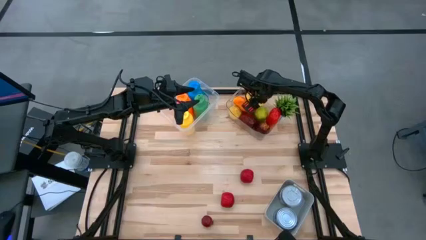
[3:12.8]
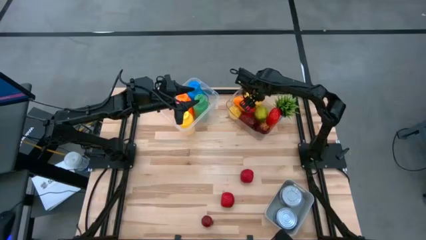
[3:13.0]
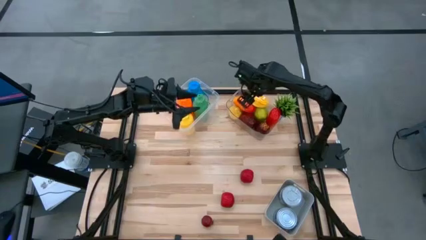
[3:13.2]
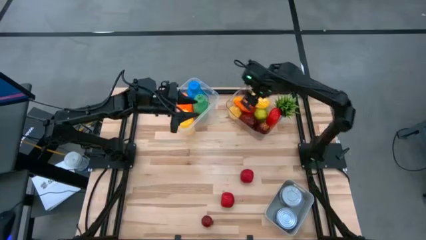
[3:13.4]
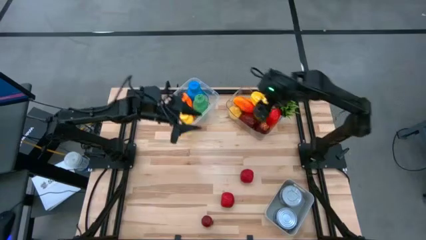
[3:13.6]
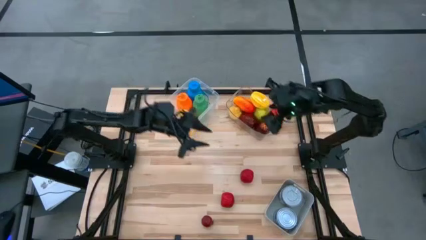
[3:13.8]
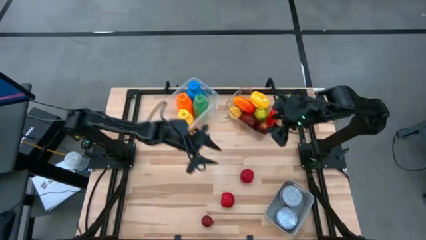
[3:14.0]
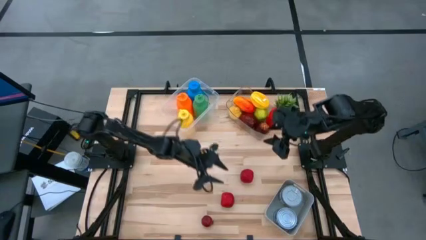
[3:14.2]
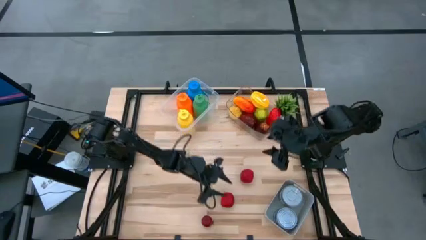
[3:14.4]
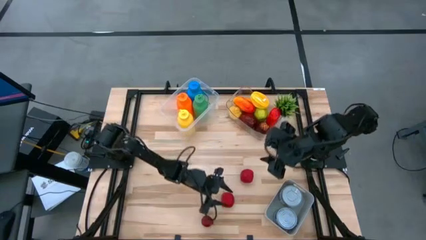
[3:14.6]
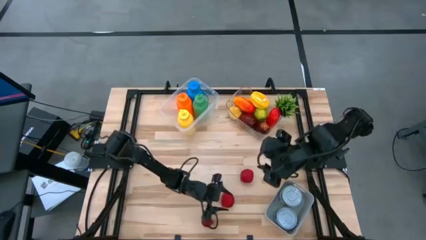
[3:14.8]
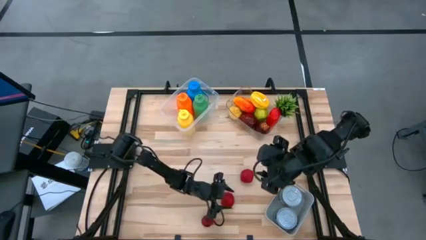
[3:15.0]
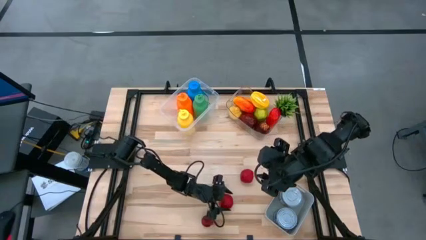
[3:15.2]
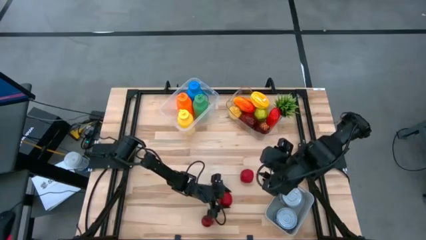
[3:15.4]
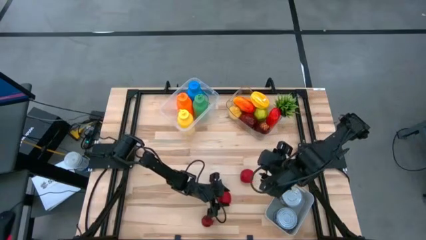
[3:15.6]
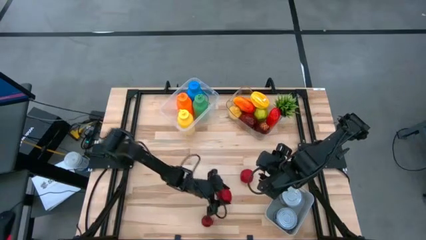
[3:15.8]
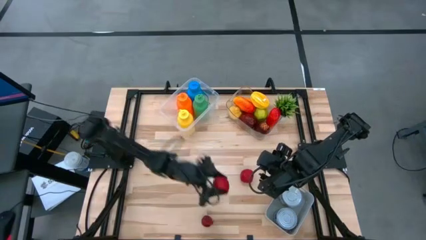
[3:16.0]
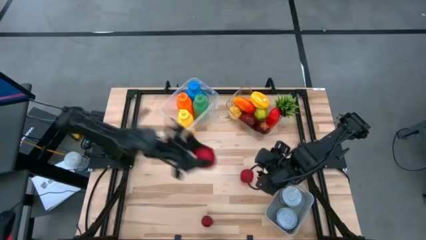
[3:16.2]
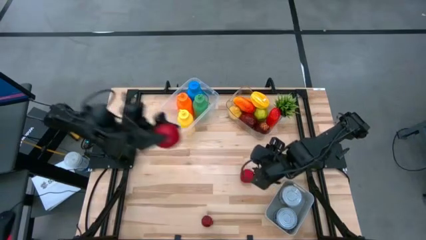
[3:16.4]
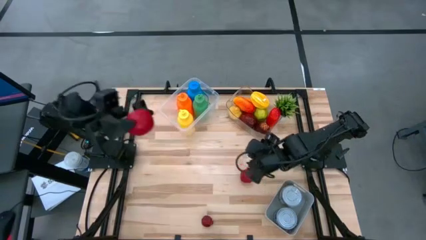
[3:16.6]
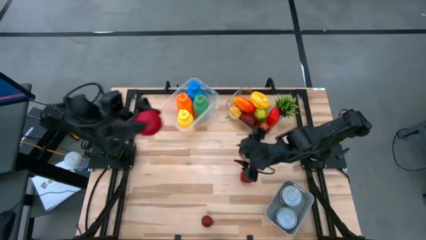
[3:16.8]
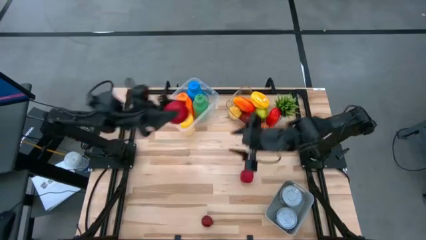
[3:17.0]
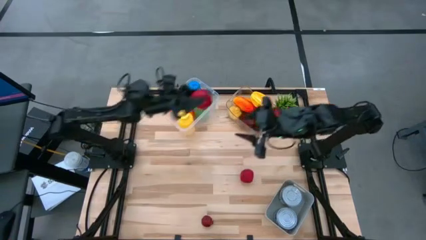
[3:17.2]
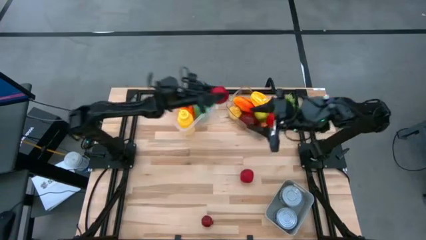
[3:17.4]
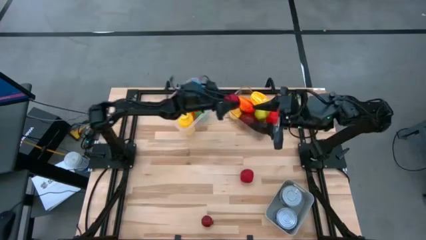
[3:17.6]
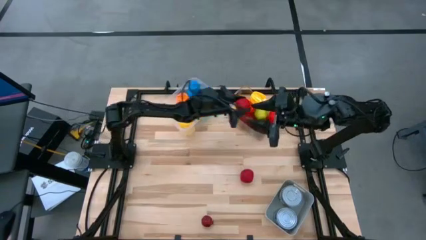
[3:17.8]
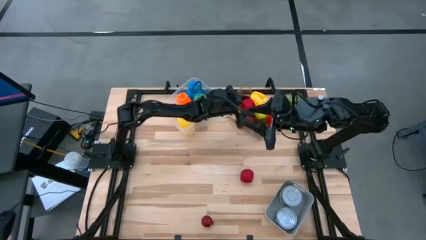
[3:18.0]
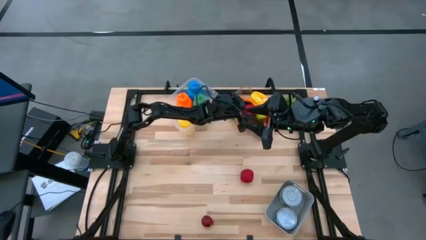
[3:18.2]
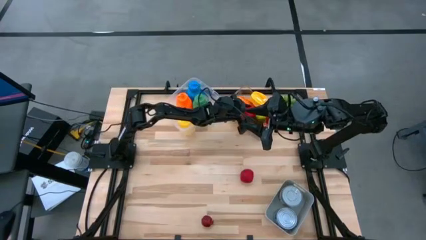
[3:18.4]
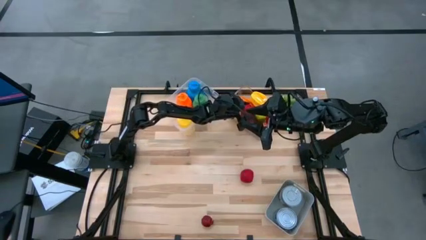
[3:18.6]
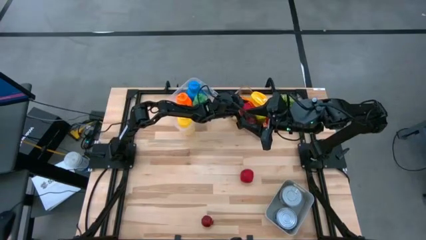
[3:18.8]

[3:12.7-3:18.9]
Task: Pick & Place Food Item
Put the bottom red apple into the right transparent bin

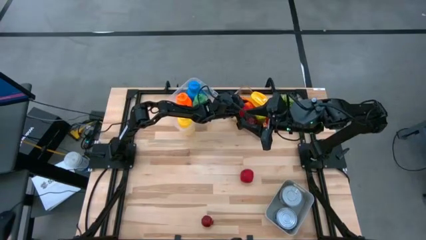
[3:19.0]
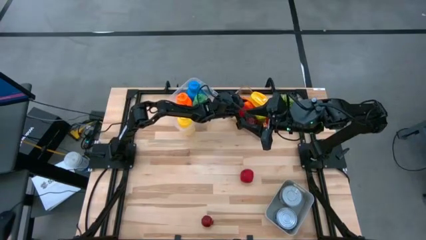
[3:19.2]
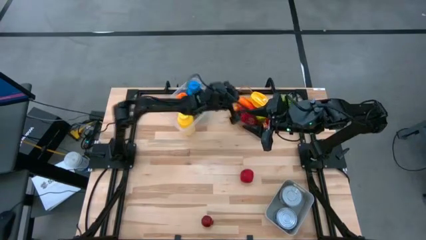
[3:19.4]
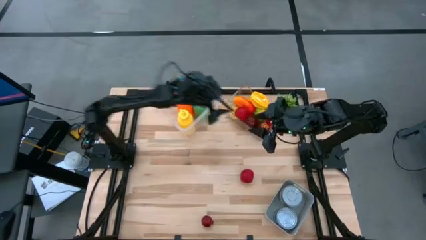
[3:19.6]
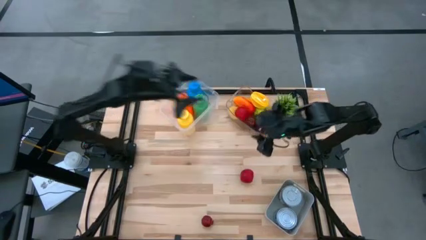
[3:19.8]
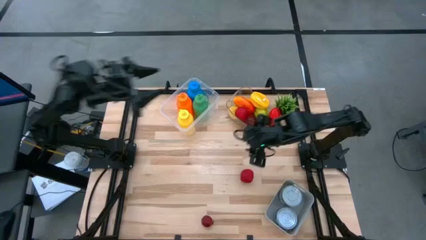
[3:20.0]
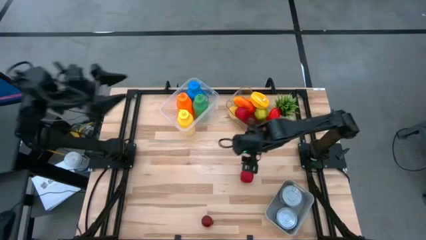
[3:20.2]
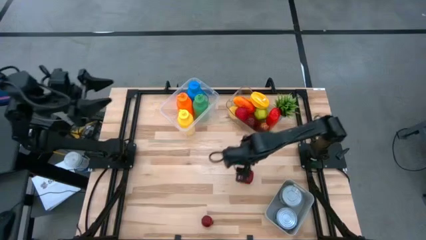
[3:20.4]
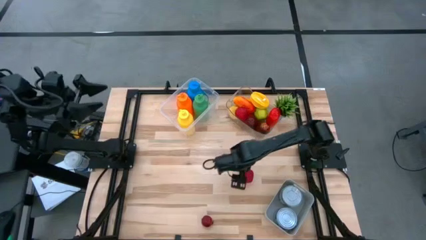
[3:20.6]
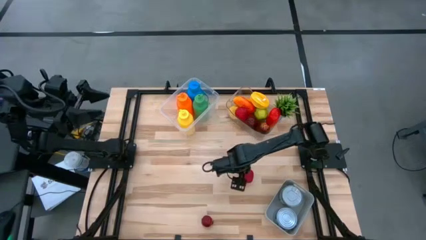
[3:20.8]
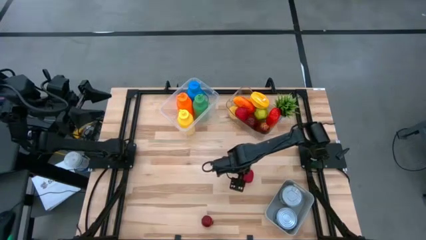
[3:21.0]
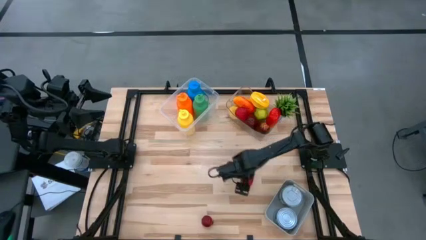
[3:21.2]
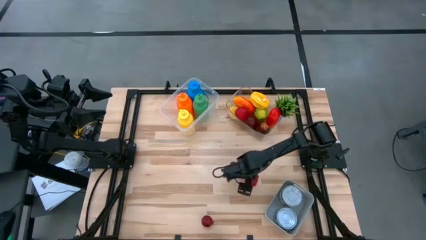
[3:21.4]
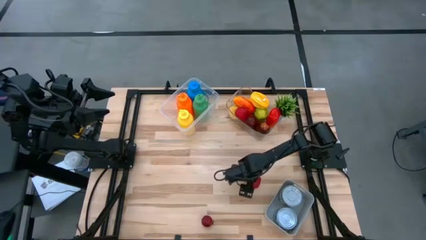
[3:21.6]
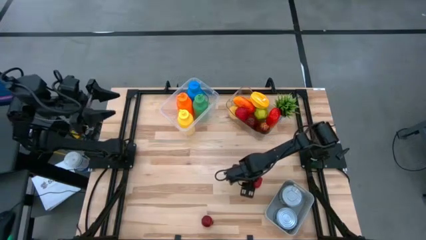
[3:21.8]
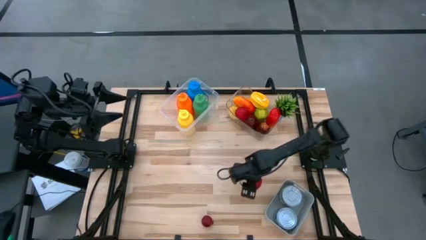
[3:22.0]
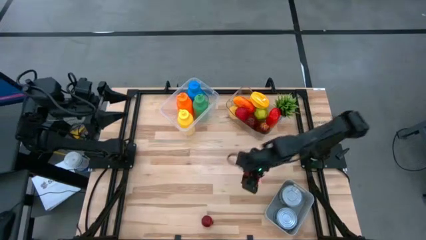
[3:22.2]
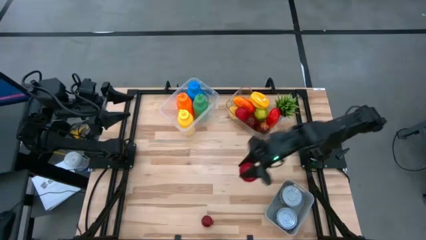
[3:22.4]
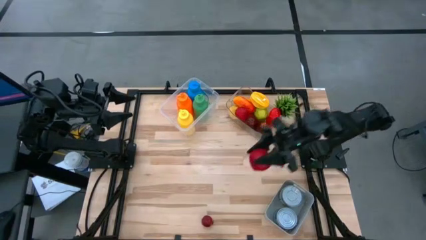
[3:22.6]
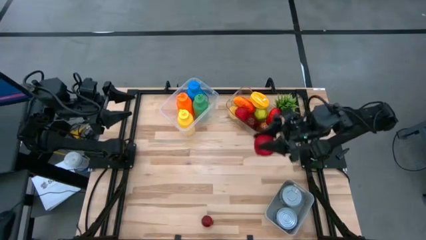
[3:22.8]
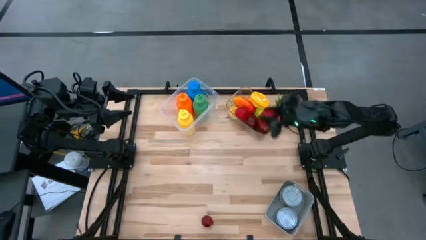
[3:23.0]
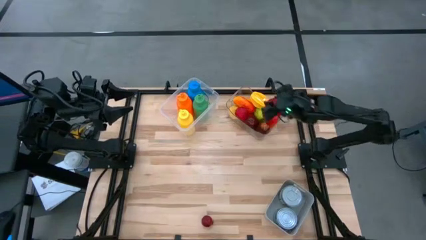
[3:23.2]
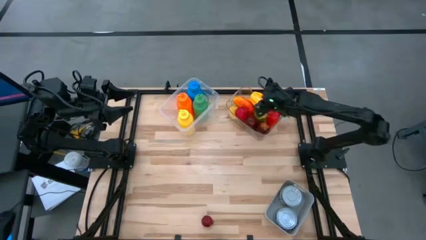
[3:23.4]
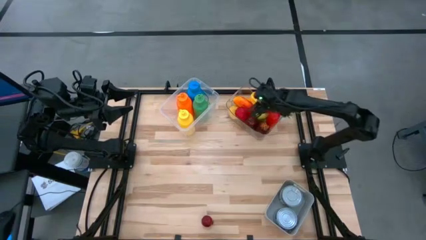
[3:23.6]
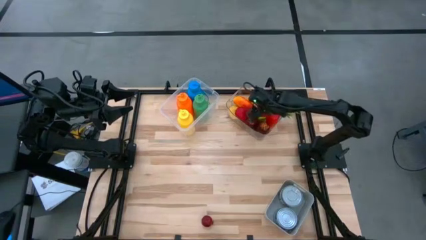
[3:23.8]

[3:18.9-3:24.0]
Put the red apple into the right transparent bin

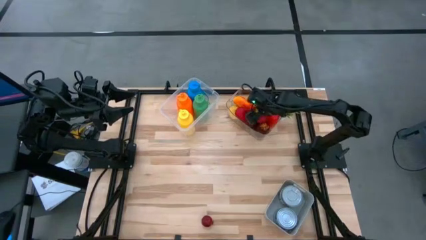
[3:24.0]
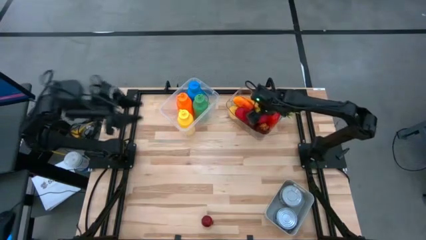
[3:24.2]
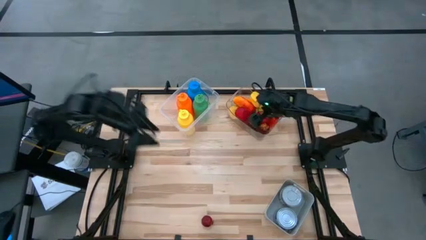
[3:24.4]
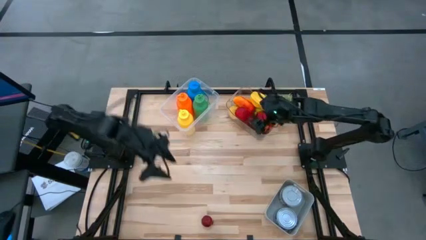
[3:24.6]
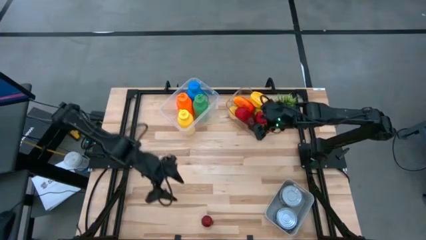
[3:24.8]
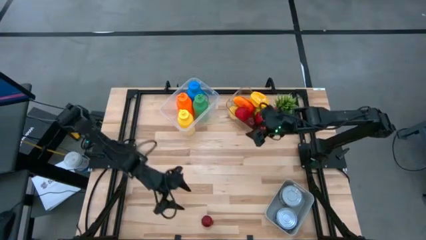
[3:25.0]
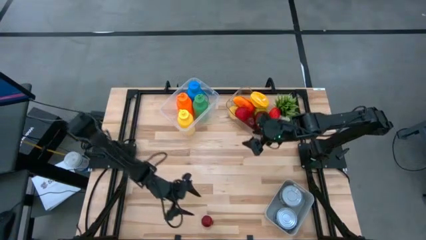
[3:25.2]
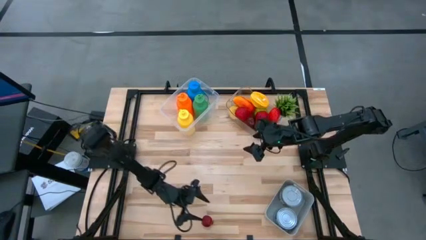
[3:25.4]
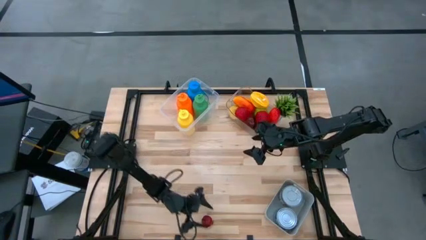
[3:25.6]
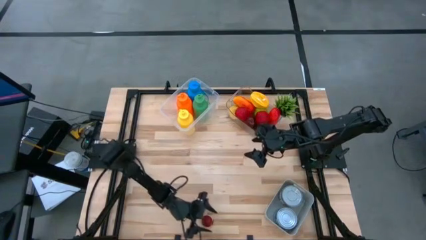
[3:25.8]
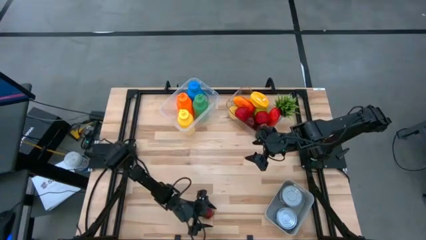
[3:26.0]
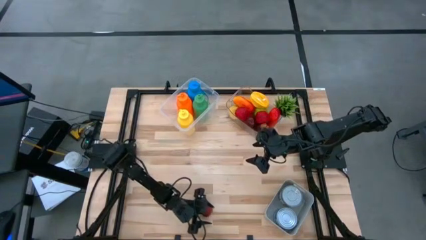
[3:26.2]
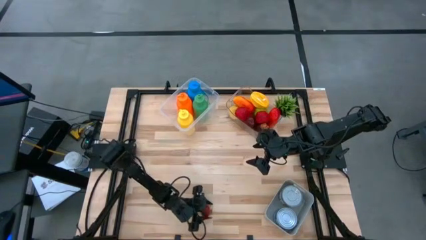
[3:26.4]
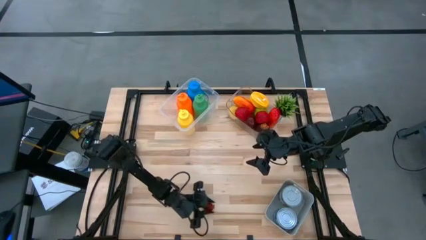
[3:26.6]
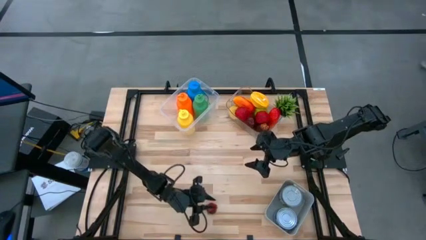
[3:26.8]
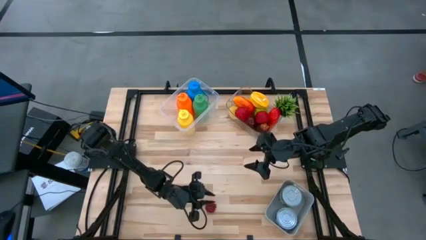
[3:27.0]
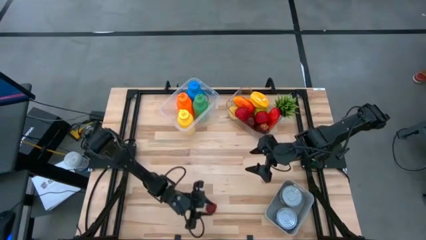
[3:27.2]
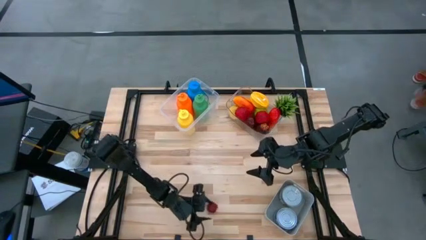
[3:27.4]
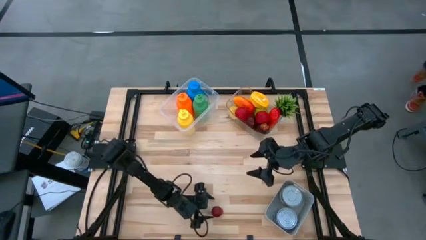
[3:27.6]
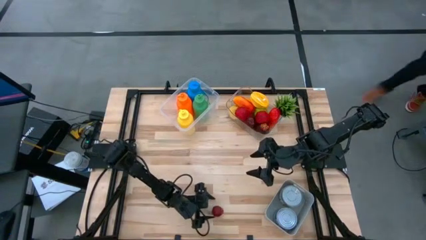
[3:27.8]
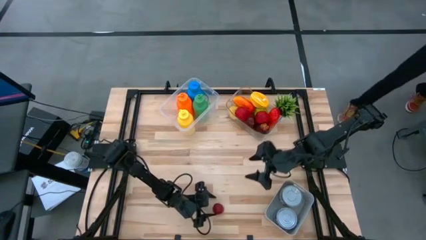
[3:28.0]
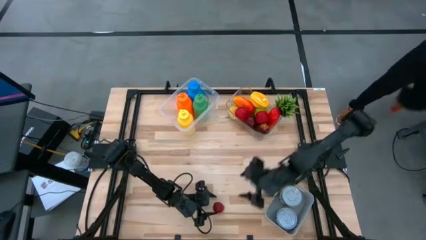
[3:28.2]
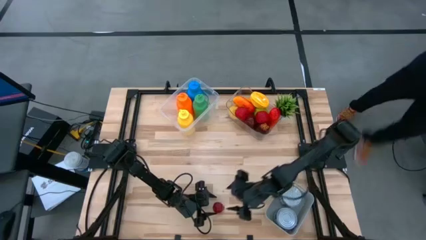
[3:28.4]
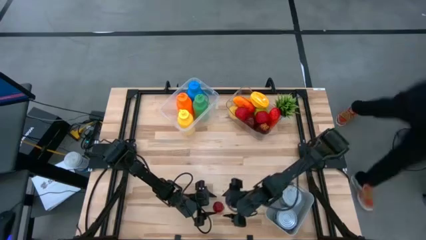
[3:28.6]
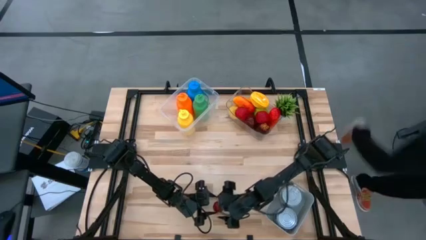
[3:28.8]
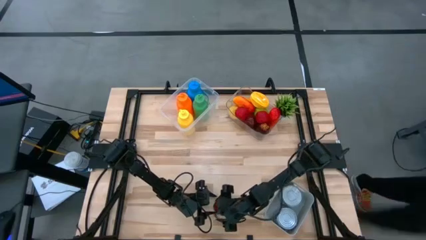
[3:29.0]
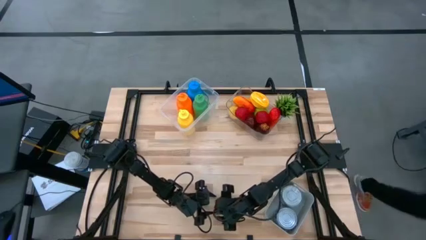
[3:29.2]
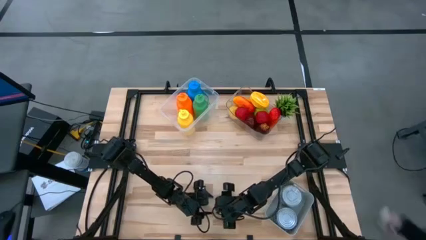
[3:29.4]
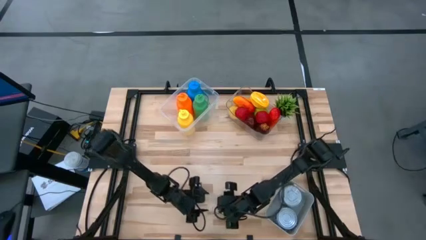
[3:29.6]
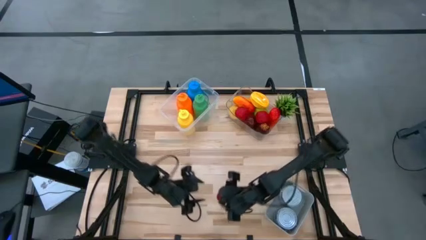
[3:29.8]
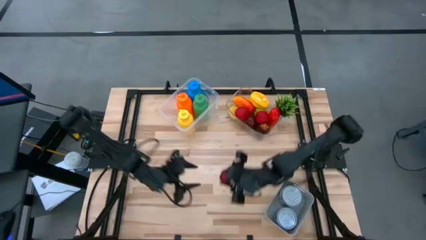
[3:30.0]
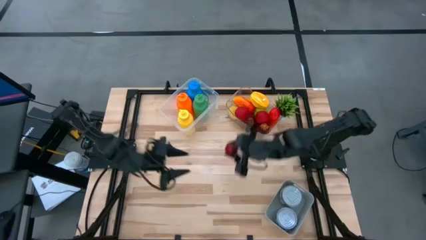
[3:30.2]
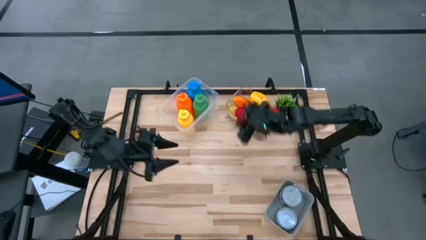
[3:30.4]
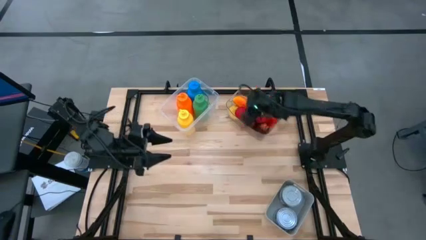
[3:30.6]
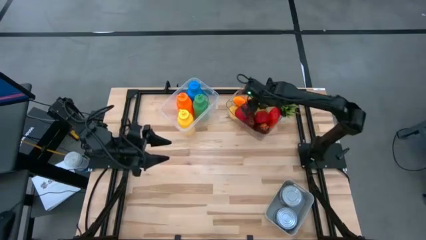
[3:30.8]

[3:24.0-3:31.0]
Put the red pomegranate into the right transparent bin
